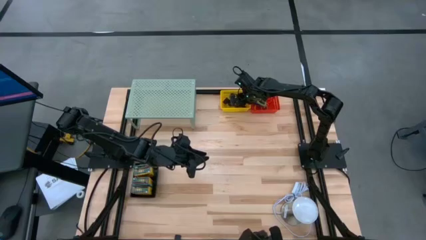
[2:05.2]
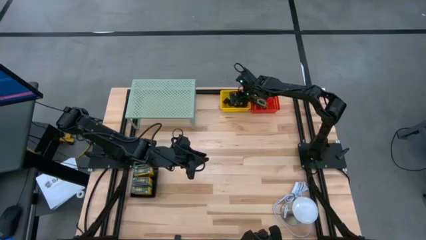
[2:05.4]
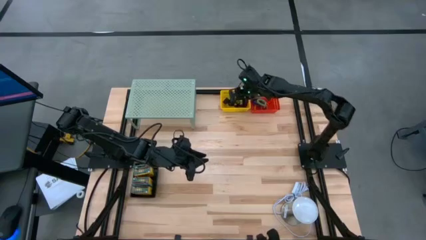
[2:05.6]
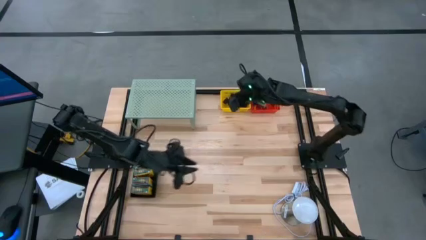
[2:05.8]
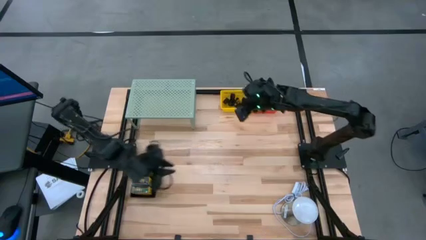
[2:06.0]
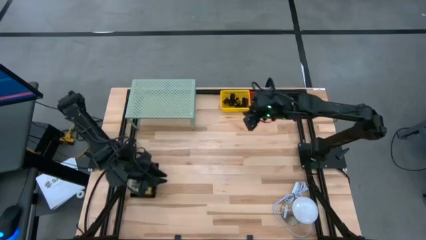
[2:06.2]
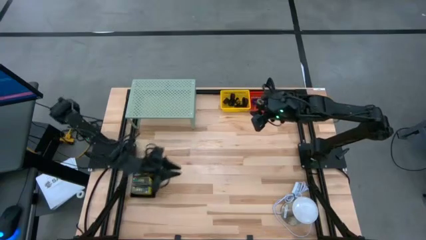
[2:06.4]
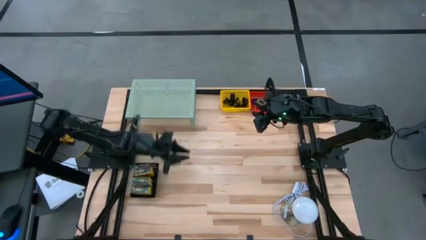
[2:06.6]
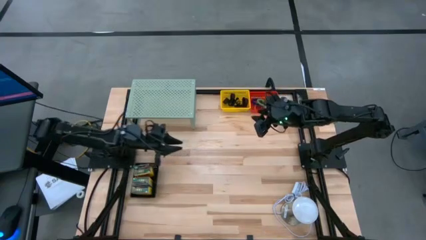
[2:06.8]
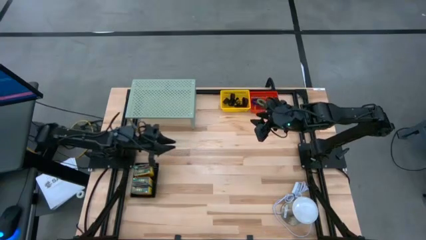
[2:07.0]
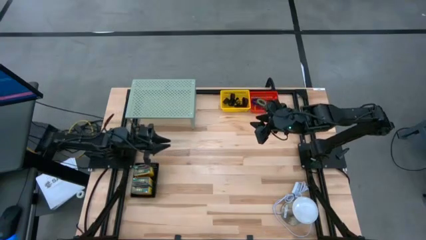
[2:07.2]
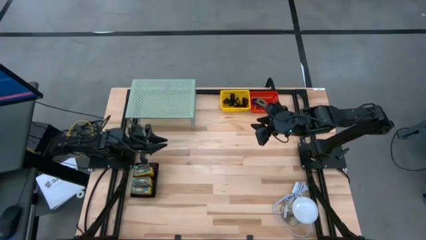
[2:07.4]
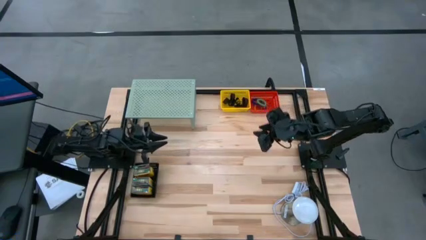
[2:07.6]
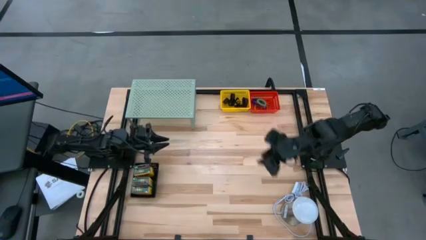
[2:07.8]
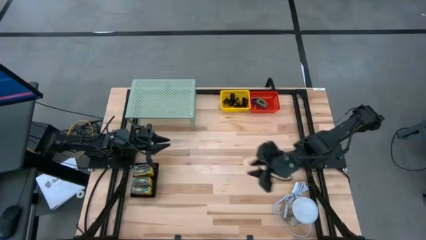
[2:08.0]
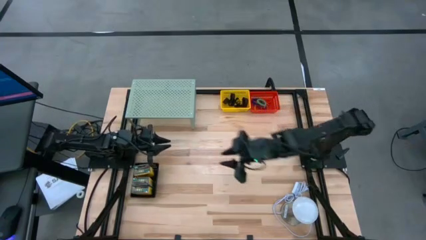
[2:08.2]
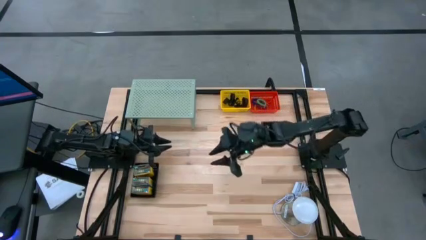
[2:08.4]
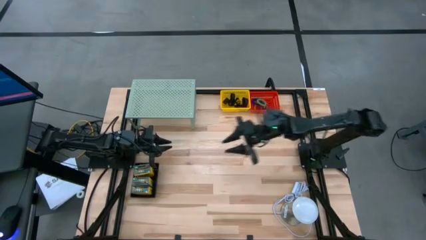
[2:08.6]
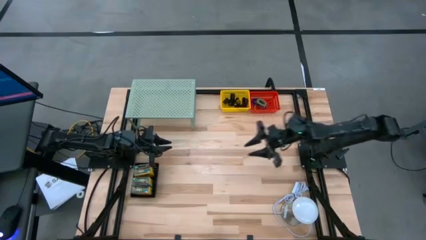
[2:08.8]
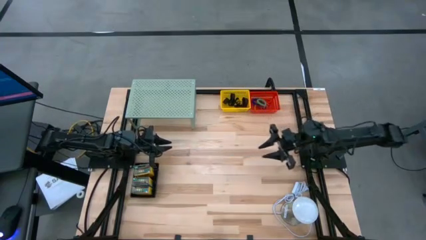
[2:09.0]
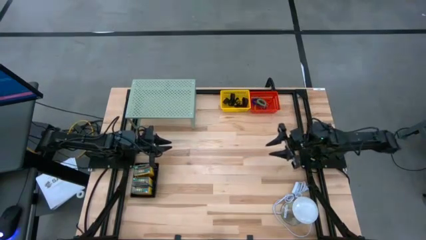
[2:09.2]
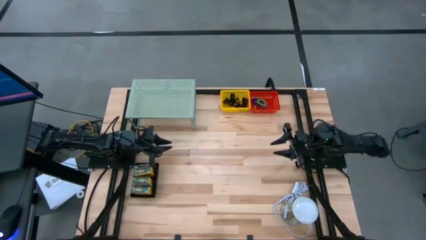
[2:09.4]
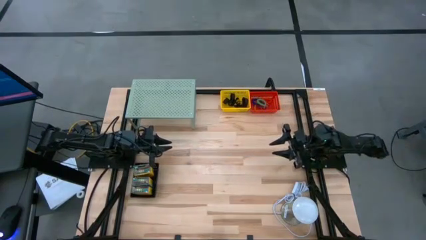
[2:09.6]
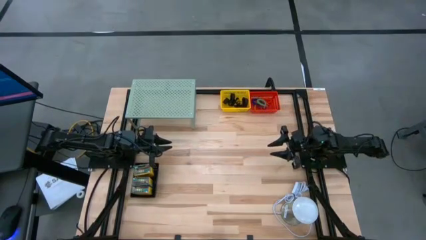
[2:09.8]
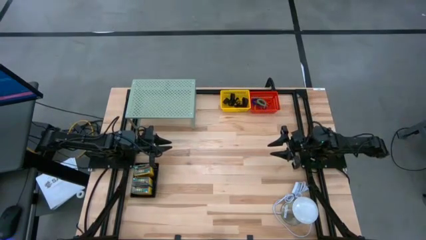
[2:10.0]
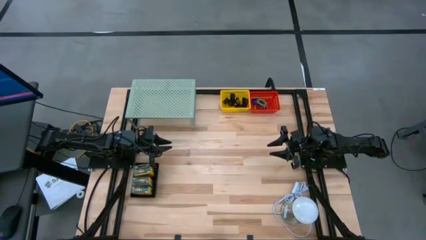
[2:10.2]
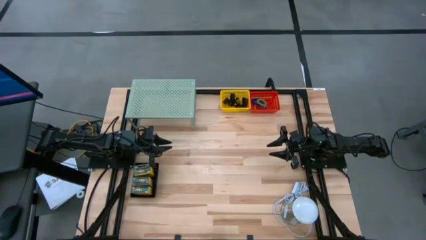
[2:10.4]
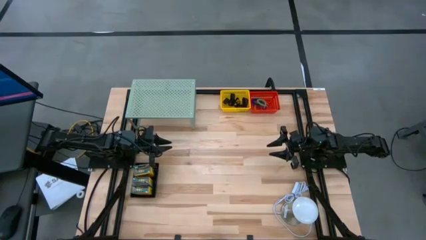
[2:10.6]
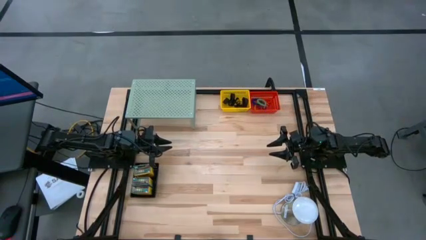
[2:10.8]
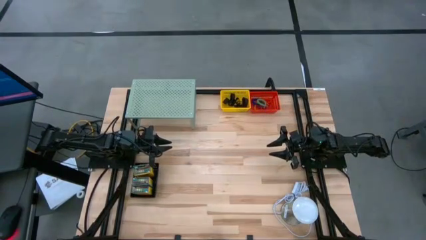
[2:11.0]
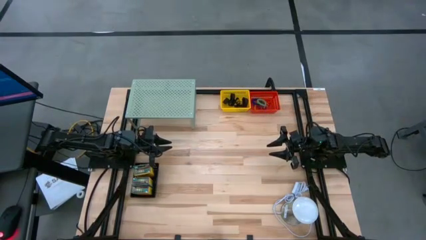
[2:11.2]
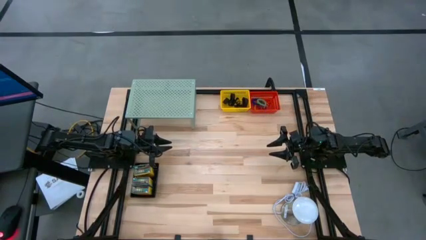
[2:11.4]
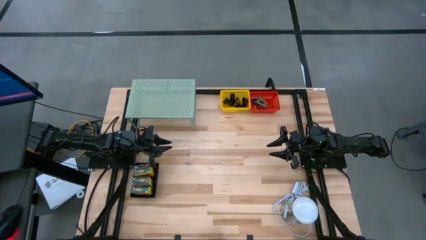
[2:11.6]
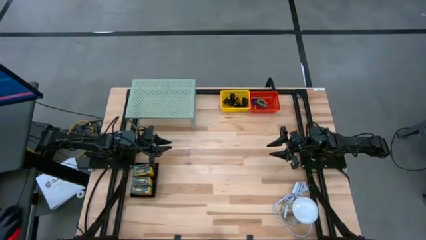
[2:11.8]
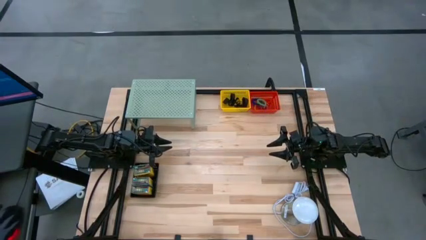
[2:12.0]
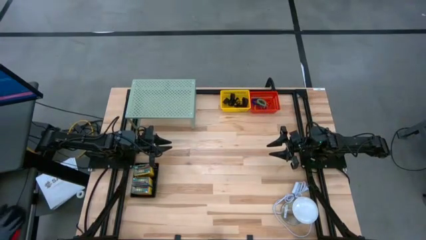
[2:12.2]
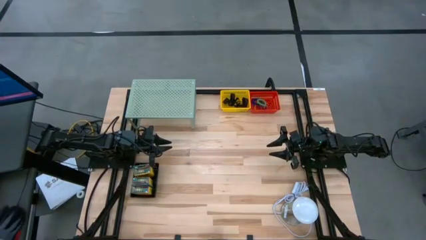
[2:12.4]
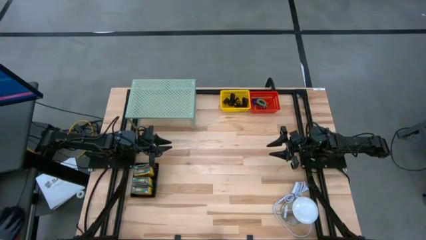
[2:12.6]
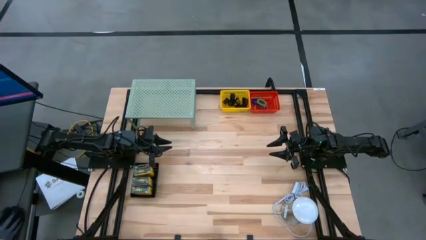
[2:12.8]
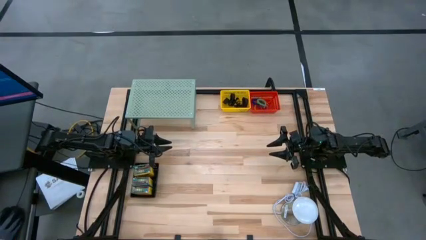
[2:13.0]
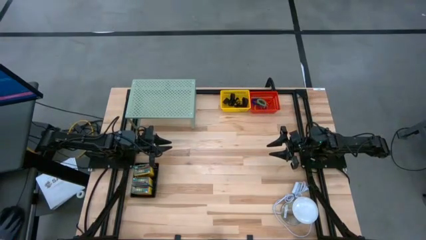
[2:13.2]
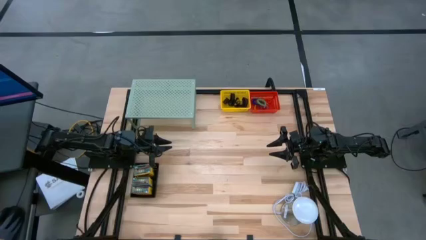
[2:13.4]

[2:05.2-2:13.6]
Task: Pick & Place Office Desk Supplies
Return to Home Position

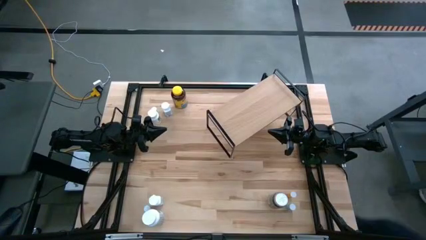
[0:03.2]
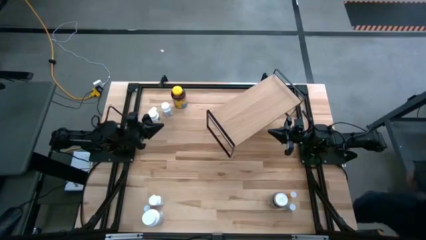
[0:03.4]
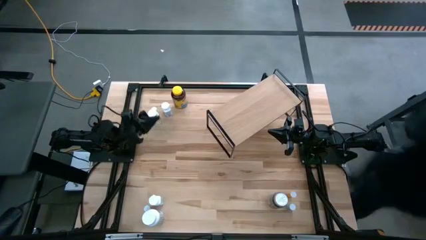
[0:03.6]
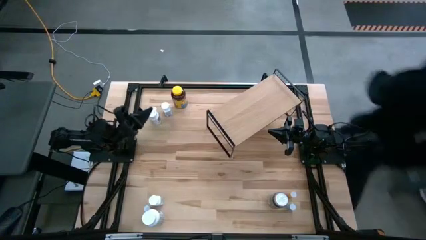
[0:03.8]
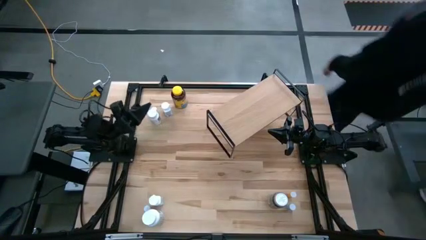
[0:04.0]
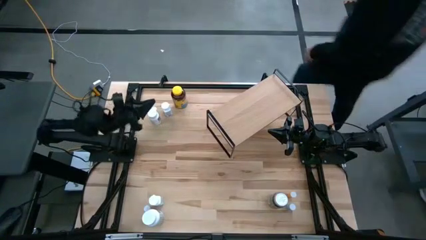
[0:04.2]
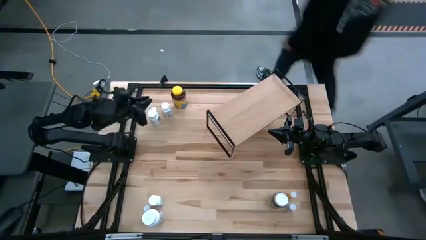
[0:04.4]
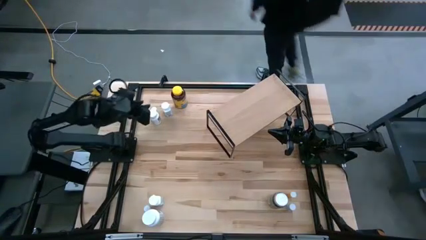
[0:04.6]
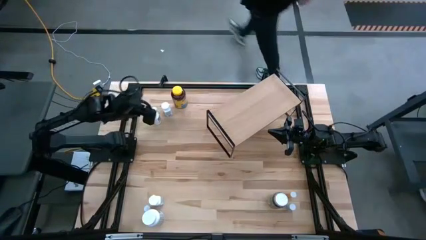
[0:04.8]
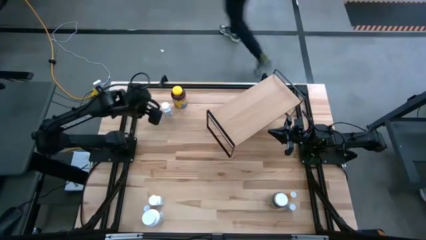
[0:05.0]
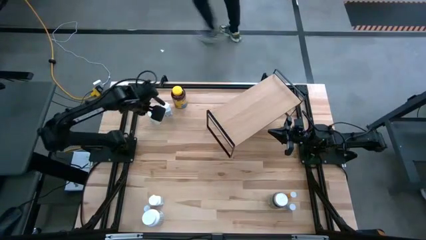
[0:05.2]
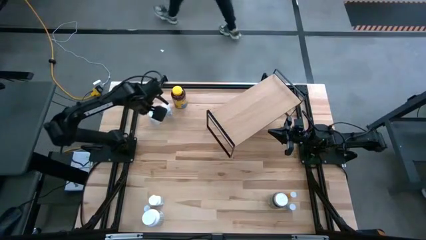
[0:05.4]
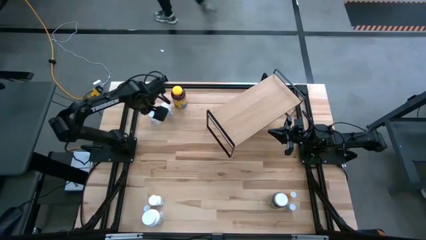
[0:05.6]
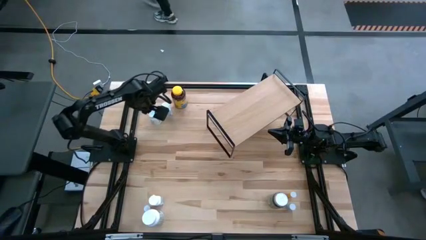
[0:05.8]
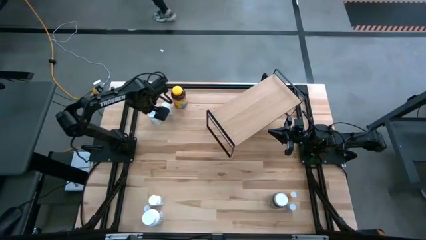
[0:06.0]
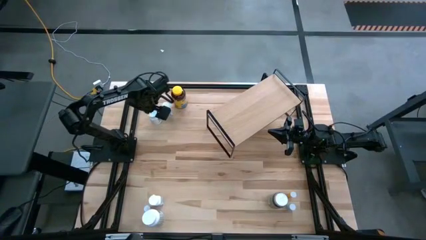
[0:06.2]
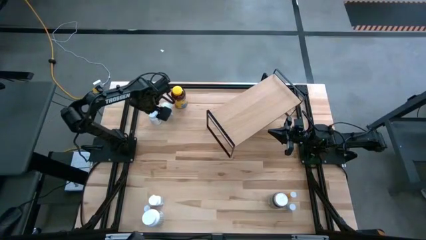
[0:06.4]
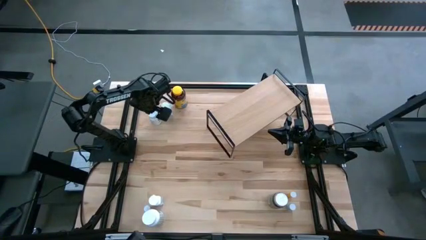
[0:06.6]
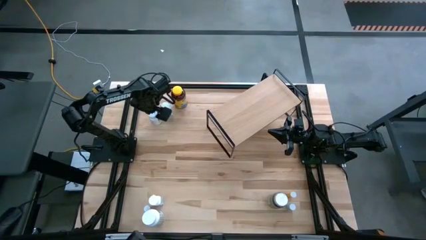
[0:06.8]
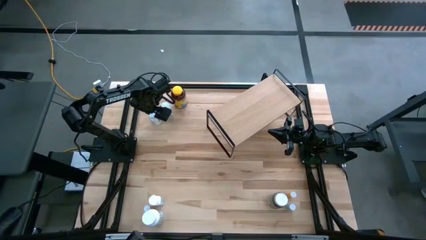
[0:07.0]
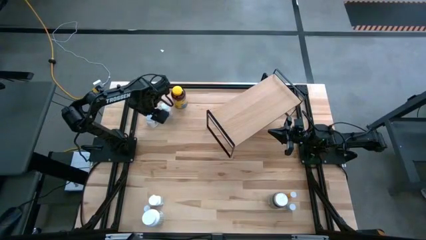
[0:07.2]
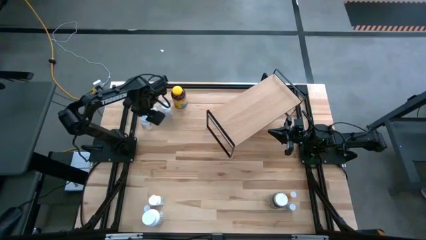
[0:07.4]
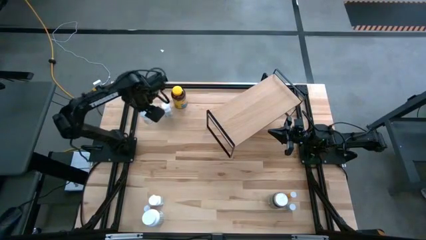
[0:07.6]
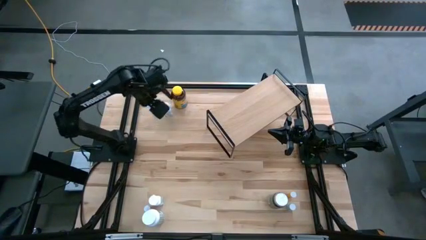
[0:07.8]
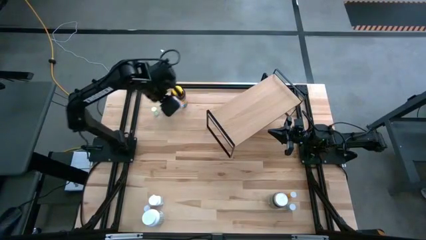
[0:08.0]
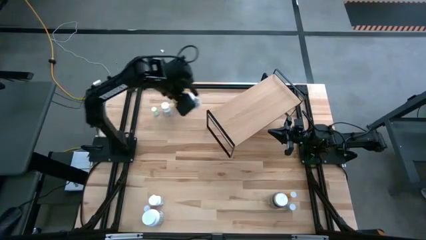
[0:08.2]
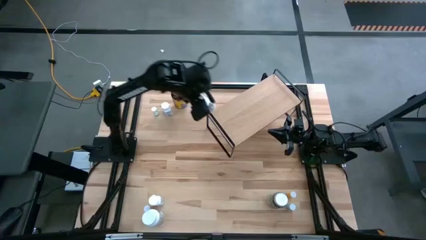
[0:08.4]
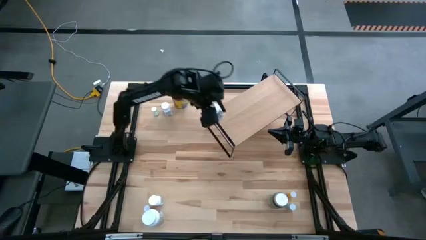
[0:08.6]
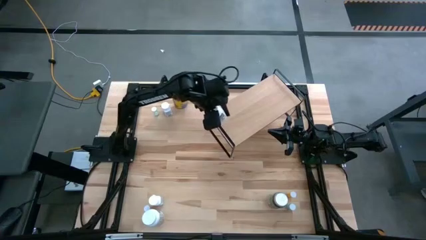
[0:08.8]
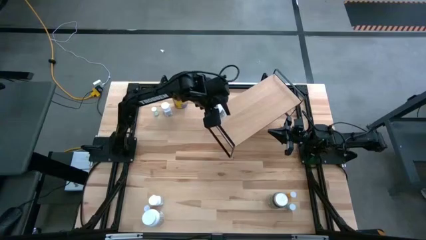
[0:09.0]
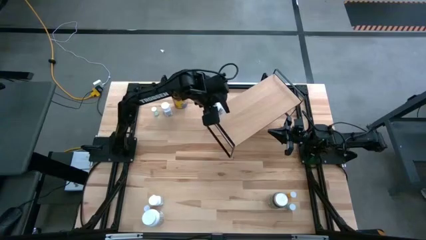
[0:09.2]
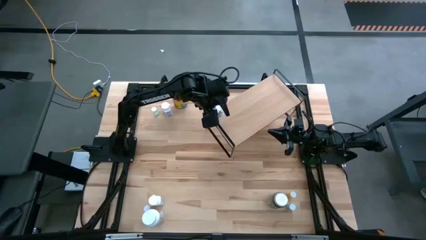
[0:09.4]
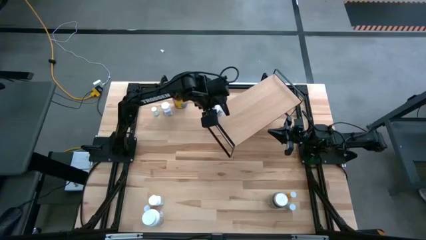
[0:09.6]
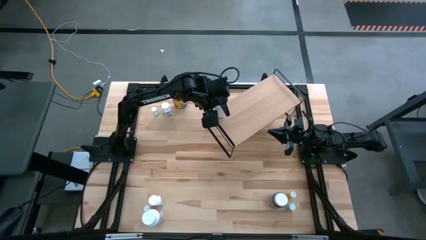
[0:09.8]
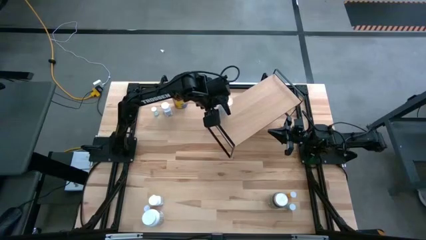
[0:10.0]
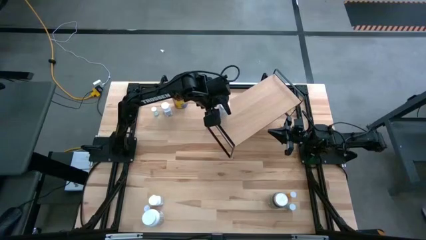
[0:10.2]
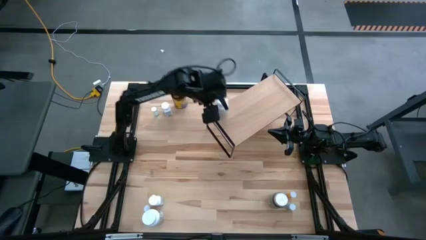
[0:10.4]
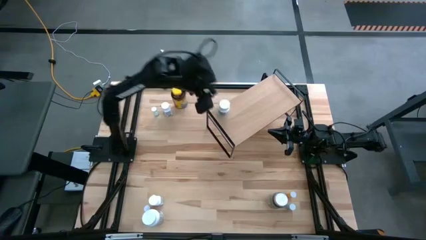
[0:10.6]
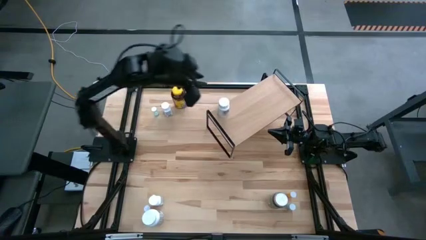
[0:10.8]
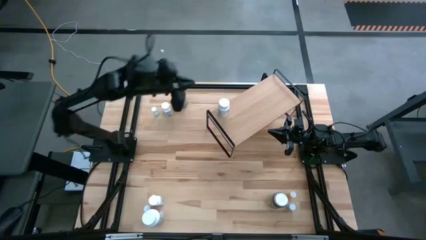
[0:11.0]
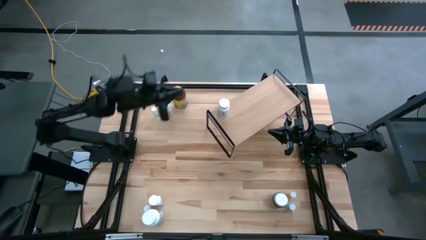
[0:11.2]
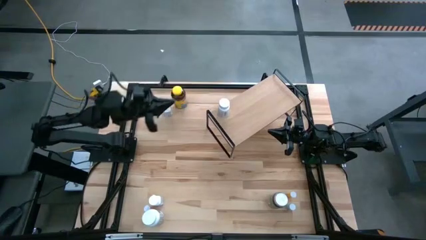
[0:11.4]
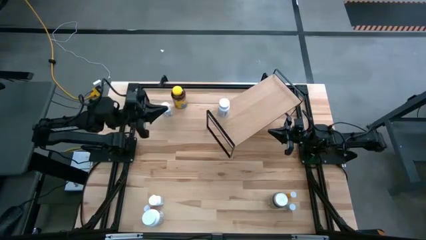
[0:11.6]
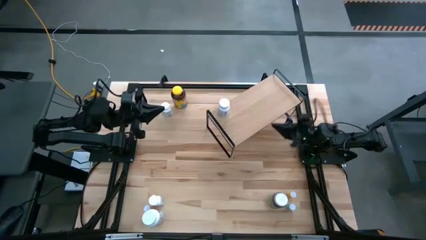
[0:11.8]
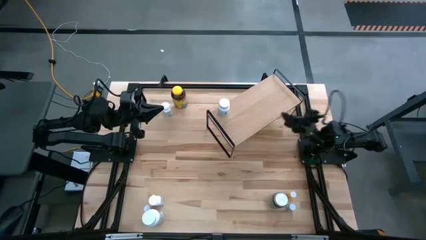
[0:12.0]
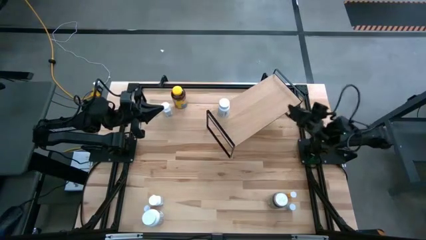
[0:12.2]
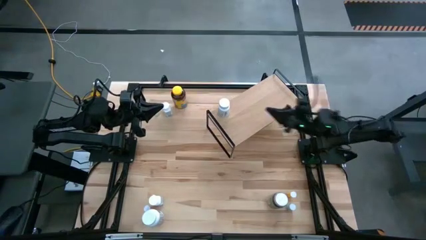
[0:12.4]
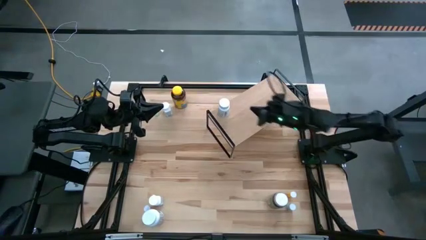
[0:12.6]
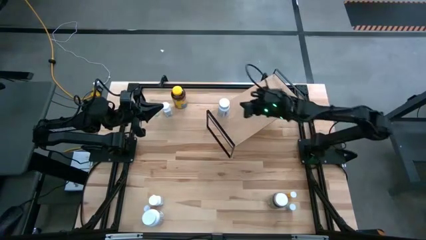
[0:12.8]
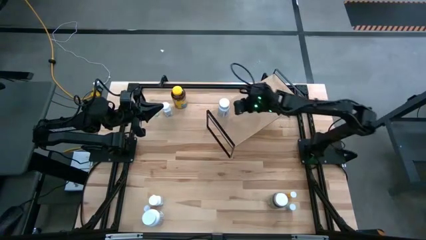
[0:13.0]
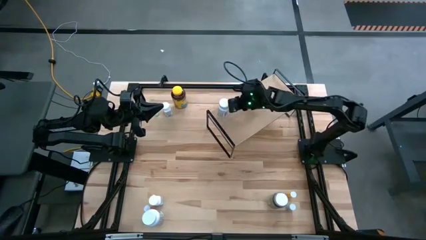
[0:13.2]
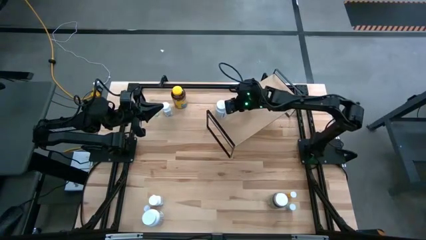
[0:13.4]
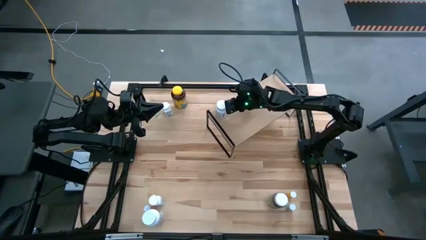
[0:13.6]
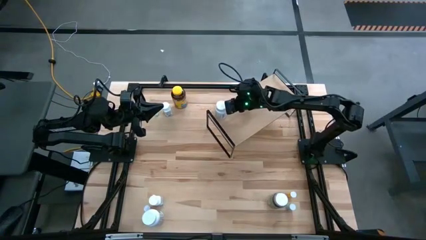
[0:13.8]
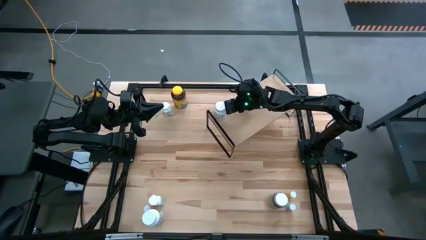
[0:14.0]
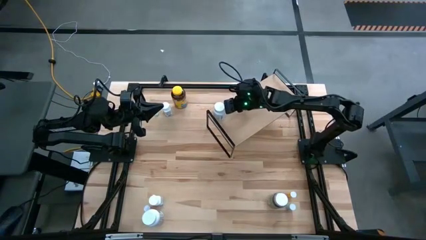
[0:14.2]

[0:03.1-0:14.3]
Task: Pick and place medicine bottles onto shelf by color
Put the large white pill bottle on the shelf
